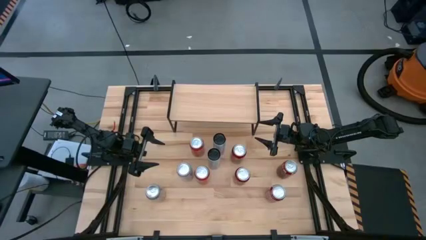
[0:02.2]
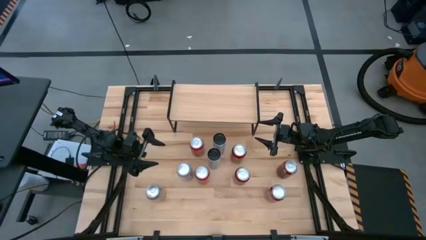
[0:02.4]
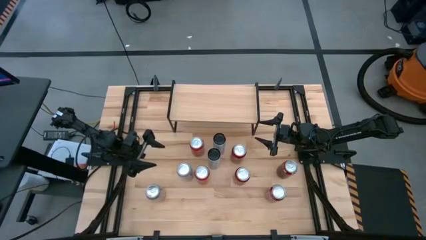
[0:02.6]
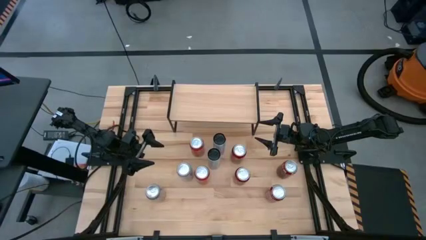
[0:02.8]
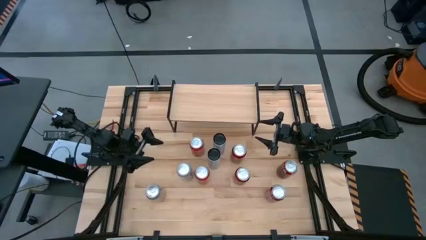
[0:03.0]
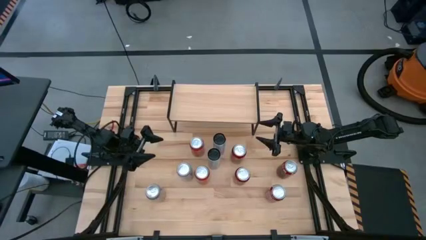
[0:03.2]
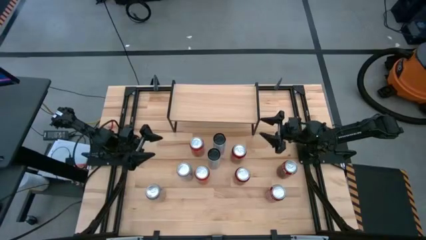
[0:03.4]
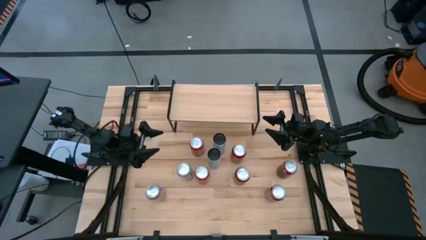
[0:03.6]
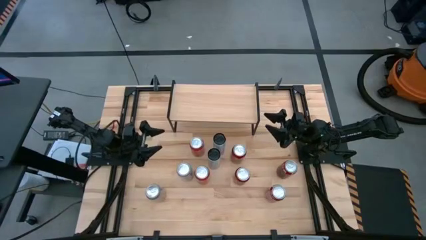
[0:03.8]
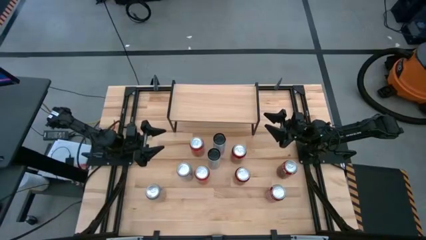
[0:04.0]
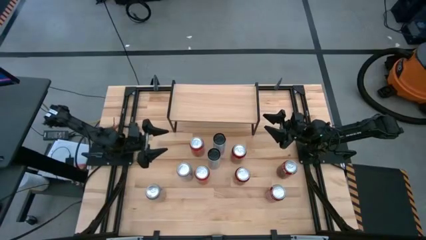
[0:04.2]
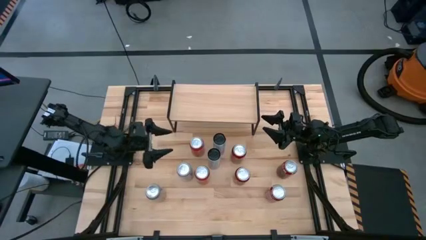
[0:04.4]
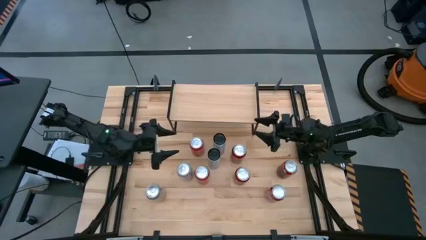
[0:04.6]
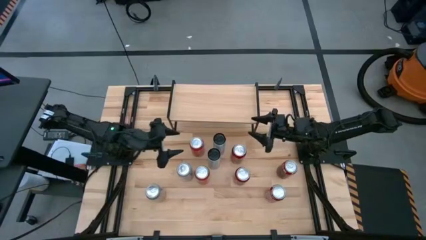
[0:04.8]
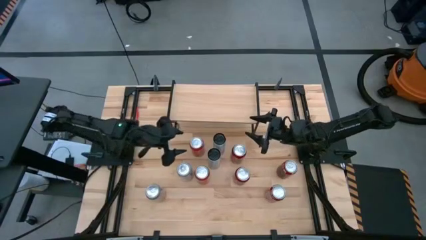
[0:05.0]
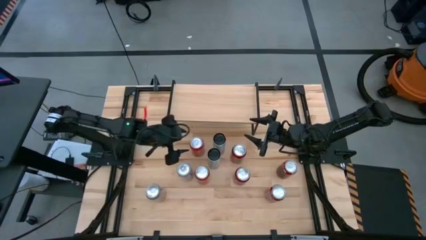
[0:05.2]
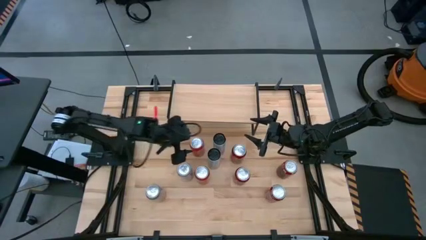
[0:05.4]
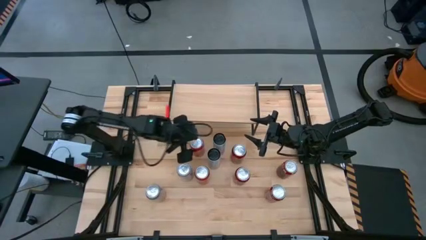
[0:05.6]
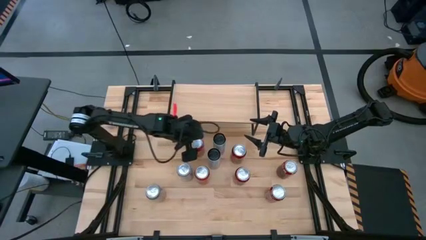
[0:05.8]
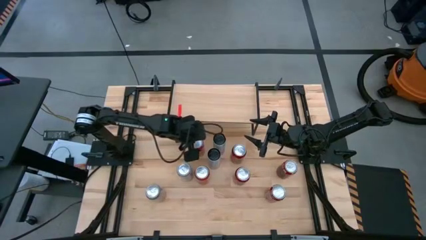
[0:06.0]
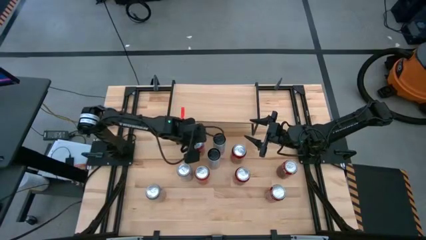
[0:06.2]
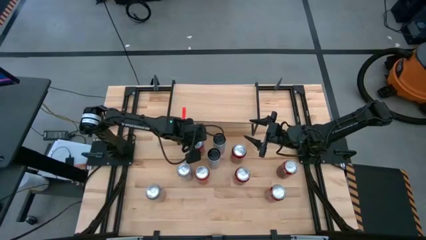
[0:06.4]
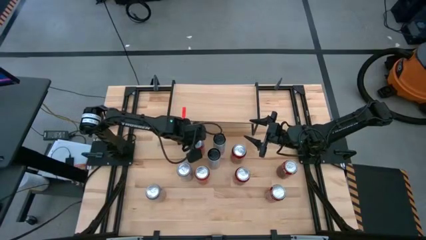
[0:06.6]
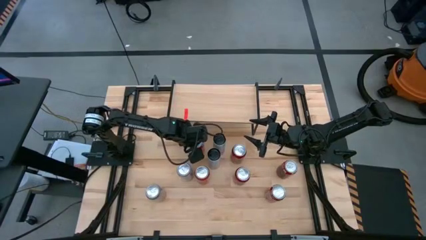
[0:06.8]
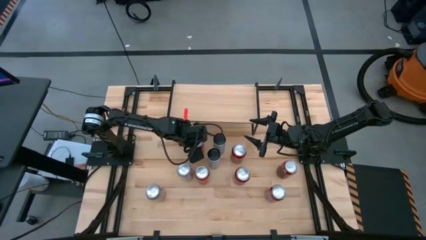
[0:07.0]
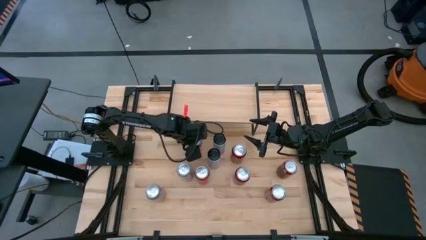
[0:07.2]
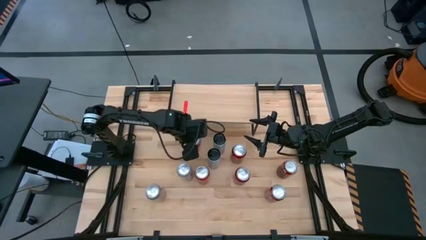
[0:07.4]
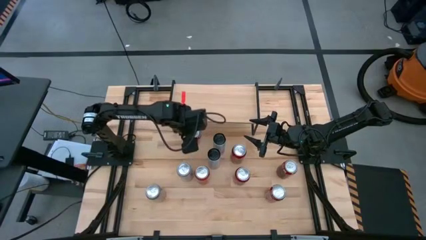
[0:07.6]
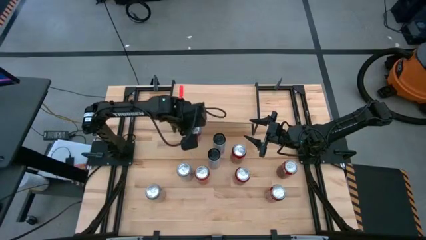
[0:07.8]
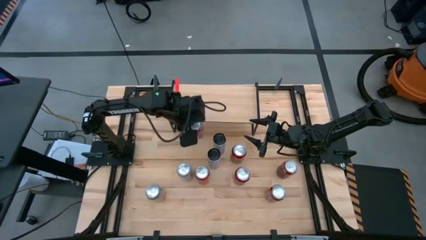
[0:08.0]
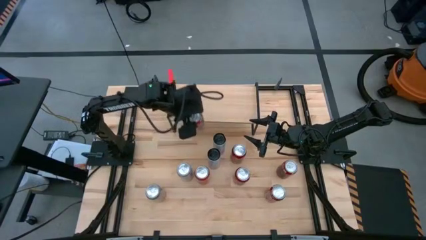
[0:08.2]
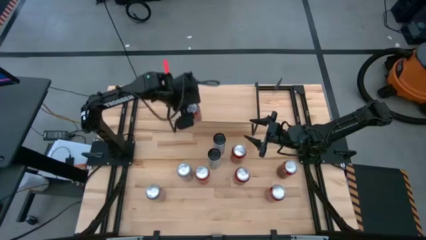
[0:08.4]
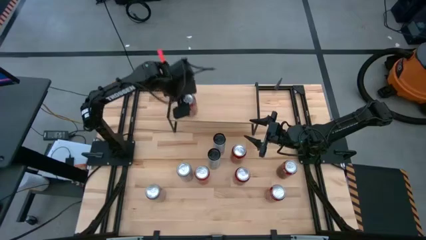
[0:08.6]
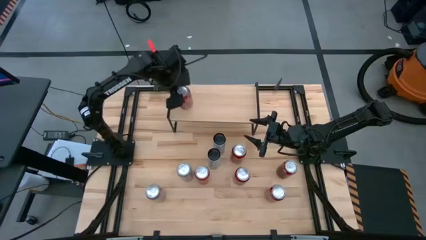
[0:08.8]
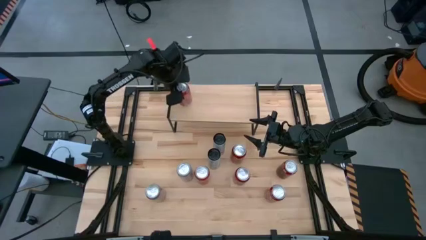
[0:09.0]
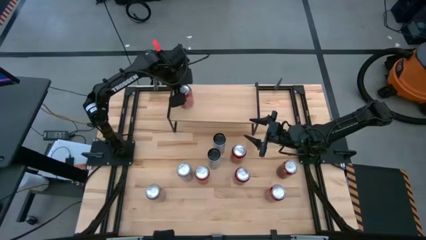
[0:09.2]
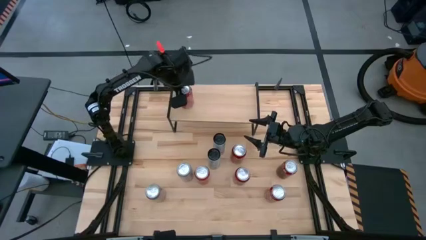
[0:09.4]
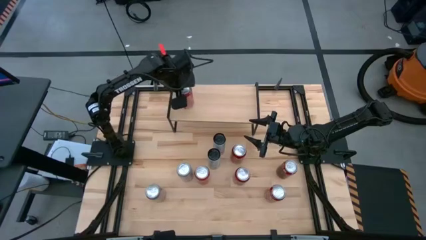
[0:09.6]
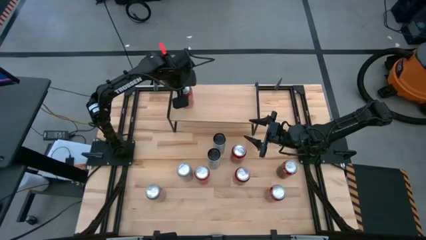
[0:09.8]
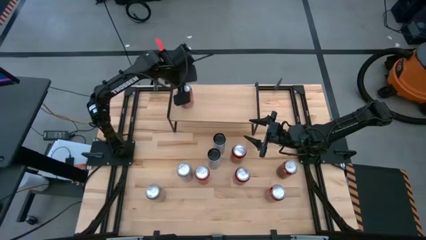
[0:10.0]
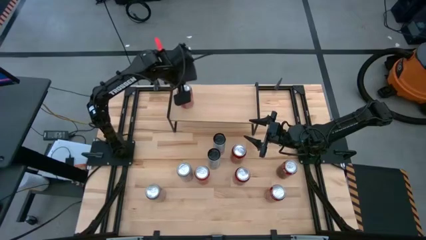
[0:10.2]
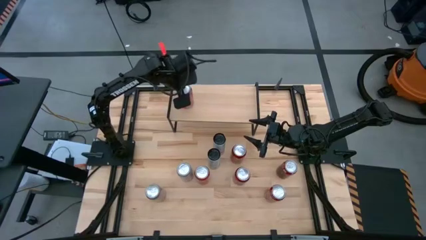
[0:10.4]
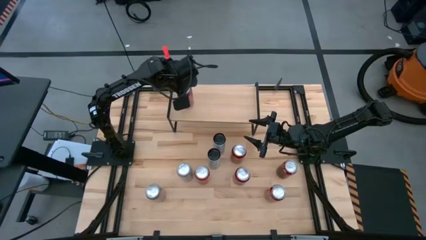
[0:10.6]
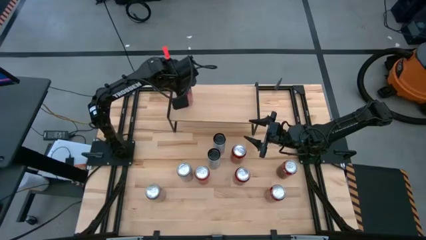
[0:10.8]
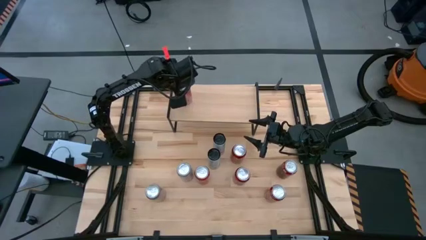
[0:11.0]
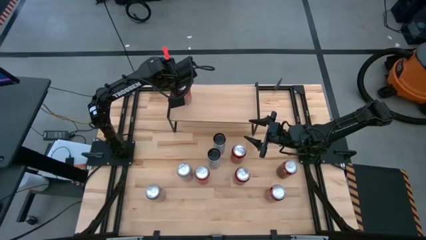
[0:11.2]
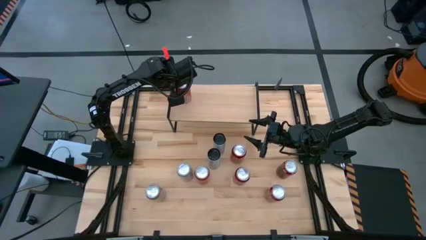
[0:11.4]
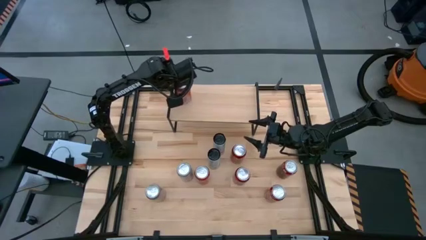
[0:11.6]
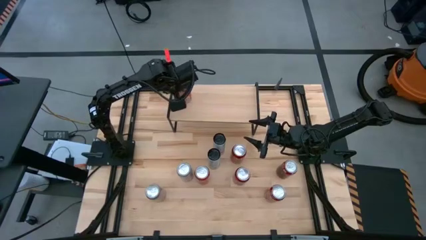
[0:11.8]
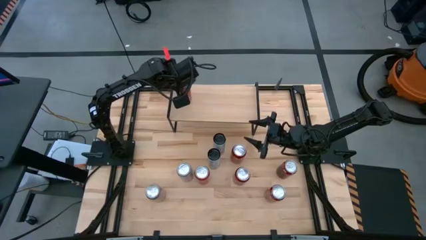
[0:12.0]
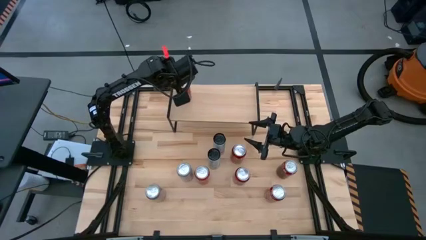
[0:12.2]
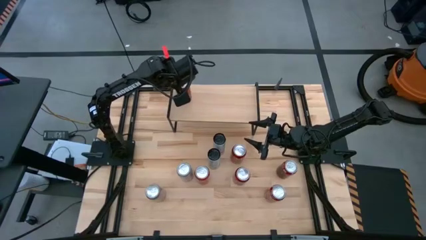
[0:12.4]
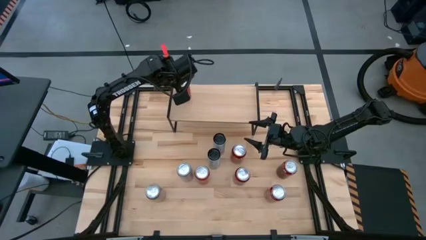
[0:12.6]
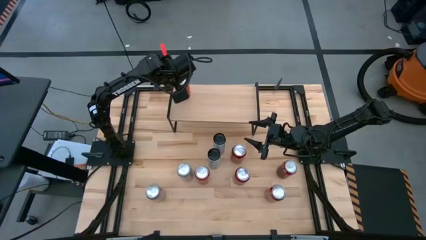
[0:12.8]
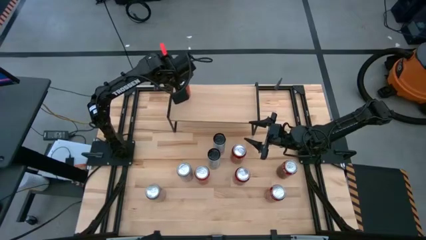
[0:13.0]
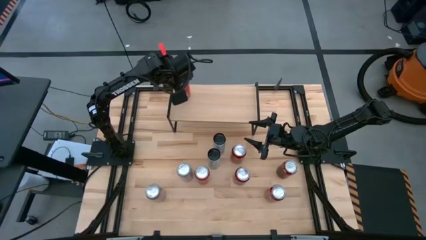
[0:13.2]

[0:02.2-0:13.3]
Task: Place canned beverage on shelf
Put the top orange soda can on the shelf

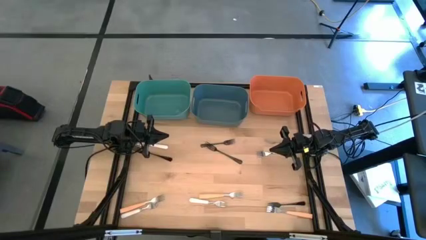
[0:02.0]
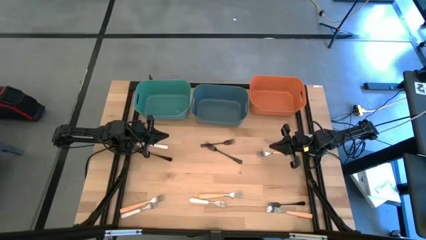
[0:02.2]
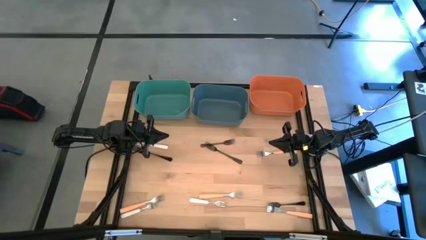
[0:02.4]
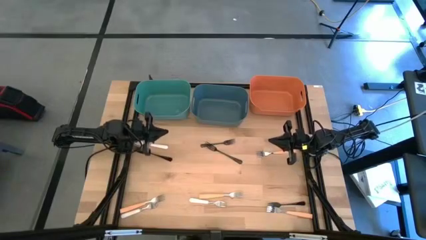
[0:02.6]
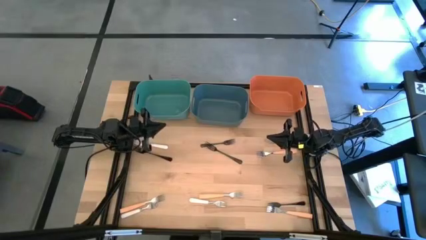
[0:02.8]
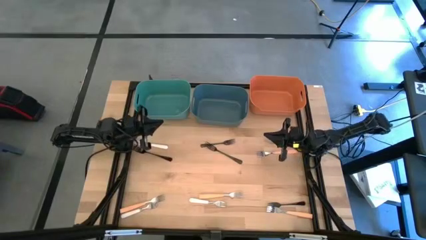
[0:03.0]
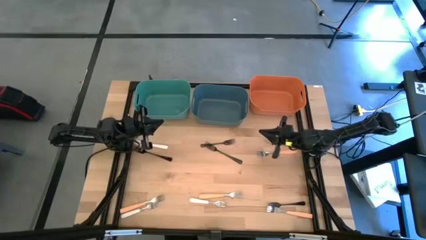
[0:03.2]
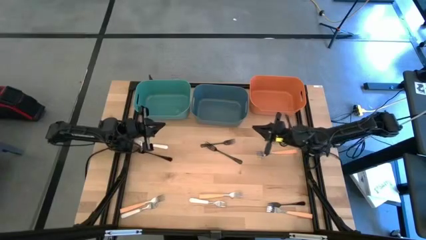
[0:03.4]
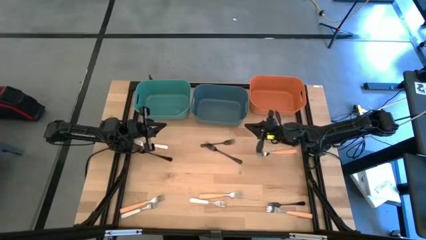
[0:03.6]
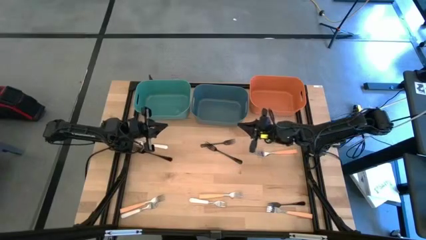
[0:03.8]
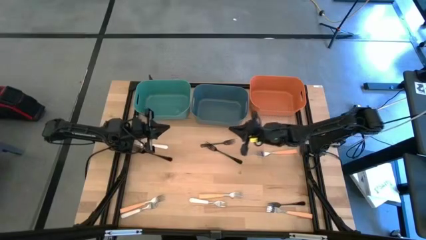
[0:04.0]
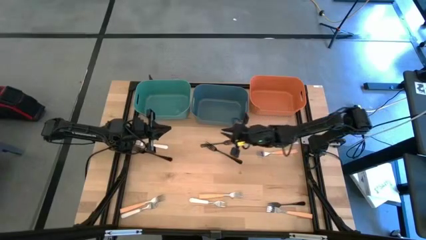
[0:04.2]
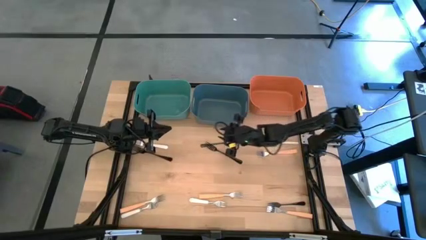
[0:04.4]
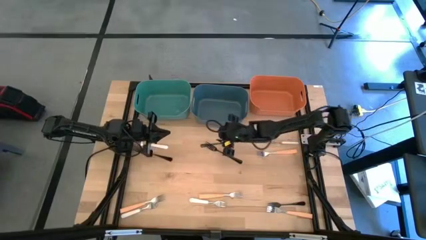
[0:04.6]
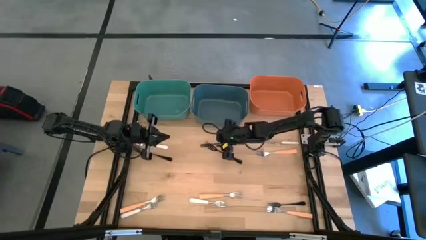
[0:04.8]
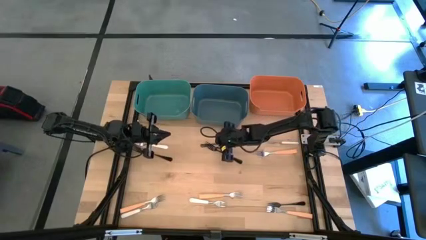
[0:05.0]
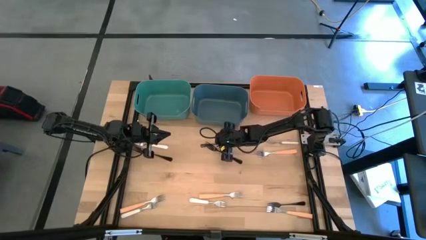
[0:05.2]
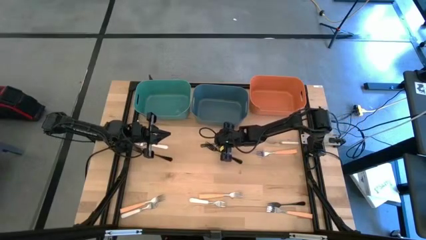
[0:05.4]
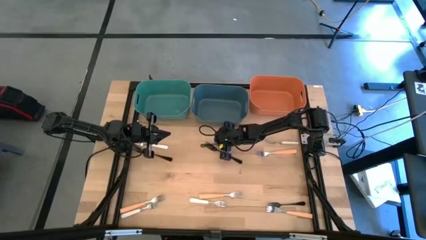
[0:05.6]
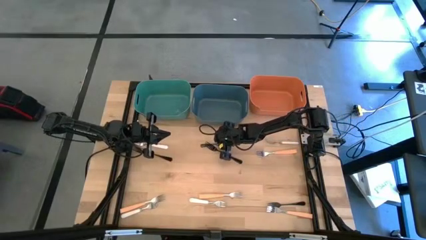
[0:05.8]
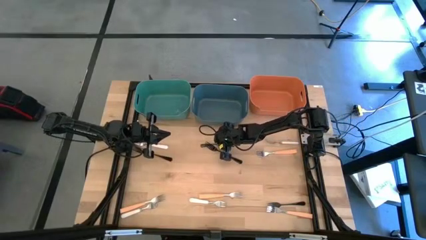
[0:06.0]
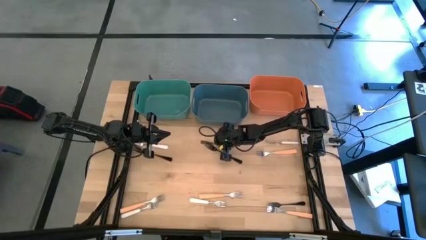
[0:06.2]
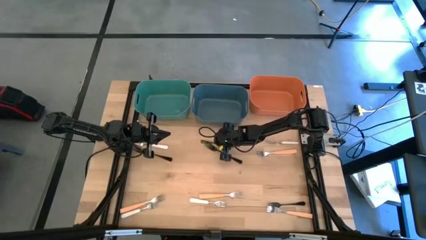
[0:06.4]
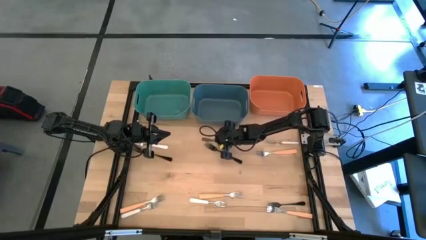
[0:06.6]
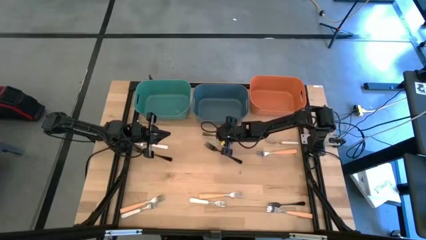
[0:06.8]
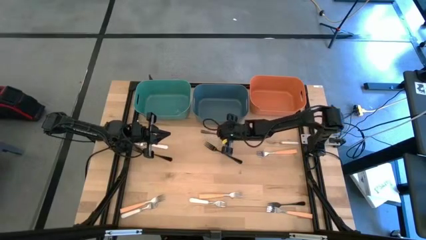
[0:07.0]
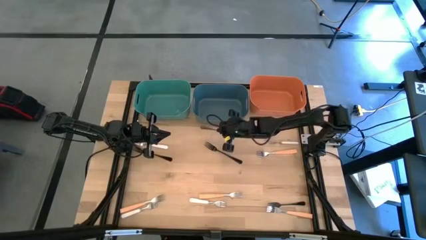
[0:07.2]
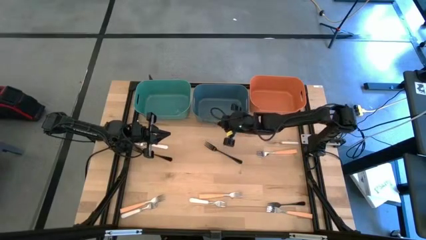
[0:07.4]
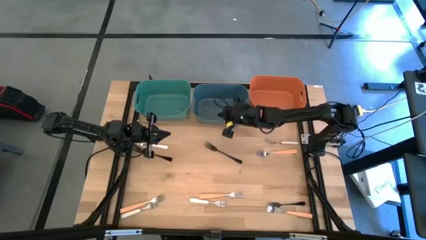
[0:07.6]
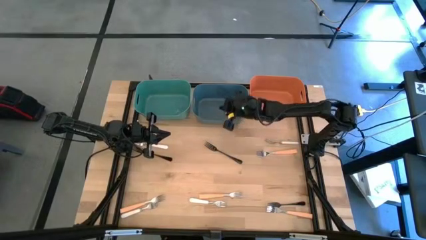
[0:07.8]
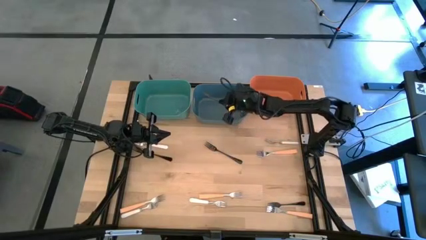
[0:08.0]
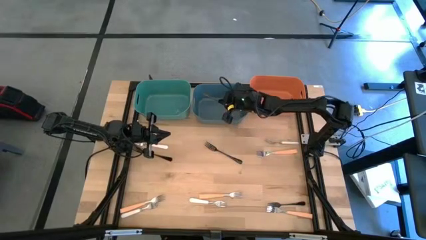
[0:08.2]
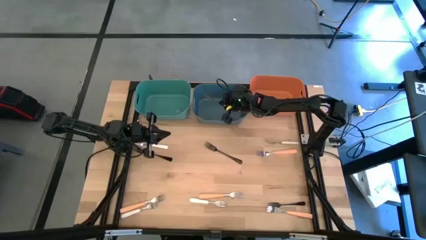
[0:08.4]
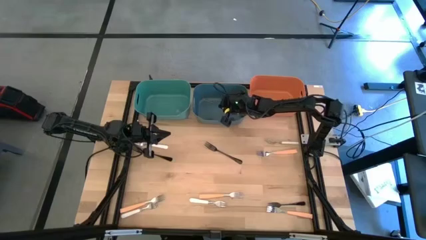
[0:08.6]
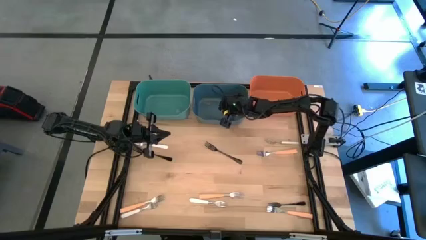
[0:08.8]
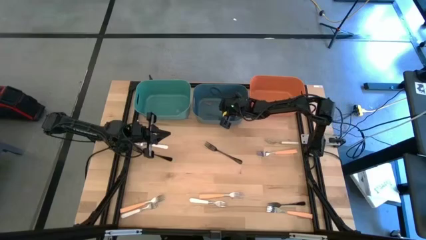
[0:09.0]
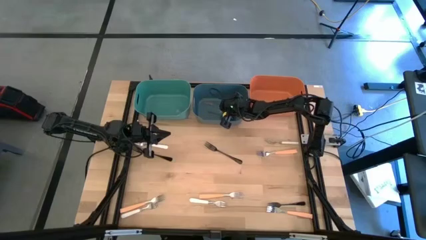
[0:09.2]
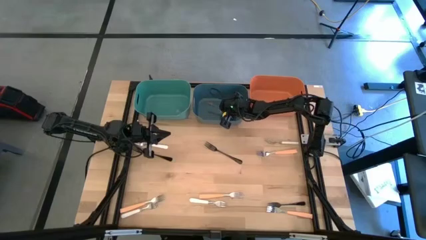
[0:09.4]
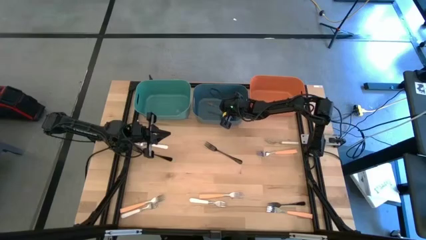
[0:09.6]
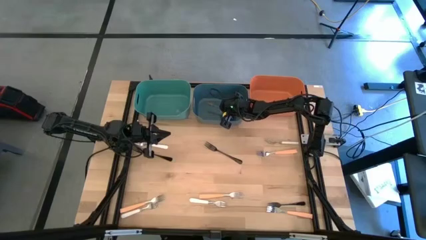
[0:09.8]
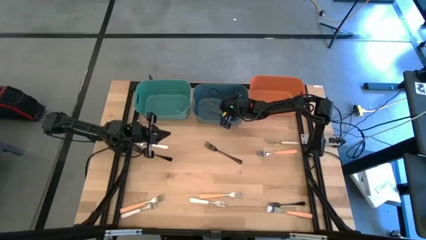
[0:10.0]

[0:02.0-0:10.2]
Task: Sort silverware by color (type)
Put the top black fork into the blue bin
